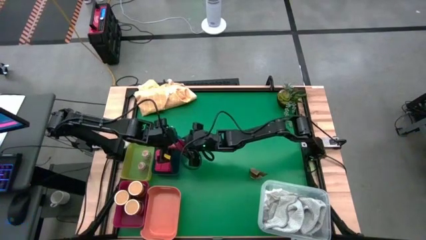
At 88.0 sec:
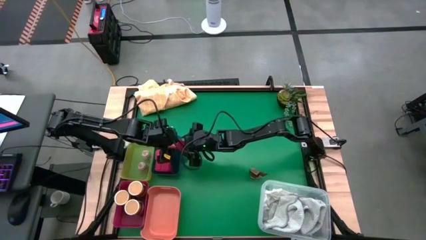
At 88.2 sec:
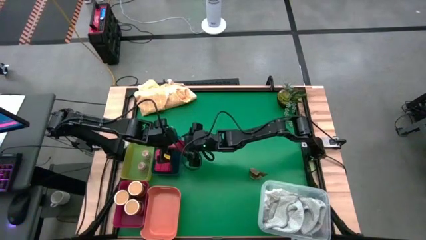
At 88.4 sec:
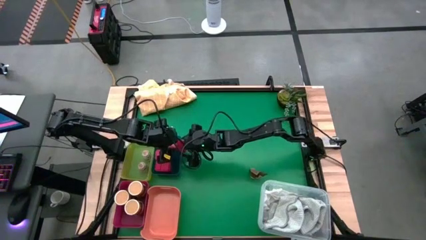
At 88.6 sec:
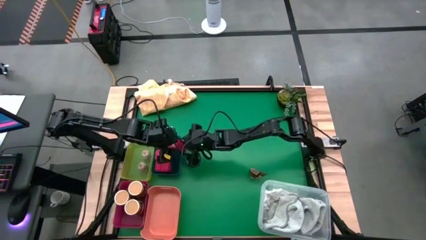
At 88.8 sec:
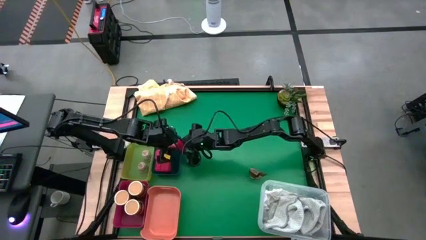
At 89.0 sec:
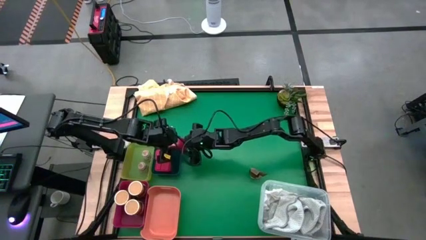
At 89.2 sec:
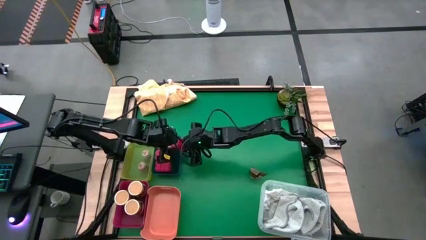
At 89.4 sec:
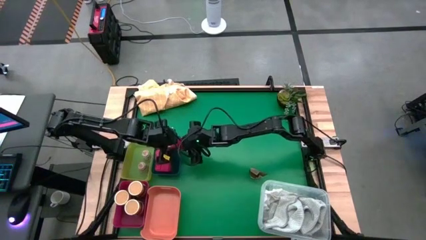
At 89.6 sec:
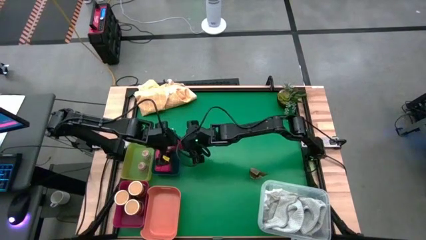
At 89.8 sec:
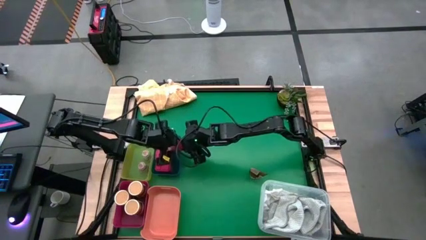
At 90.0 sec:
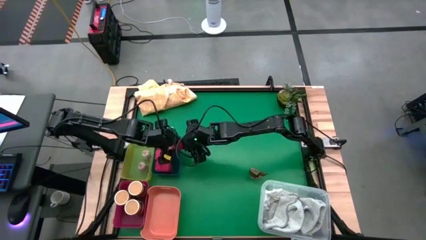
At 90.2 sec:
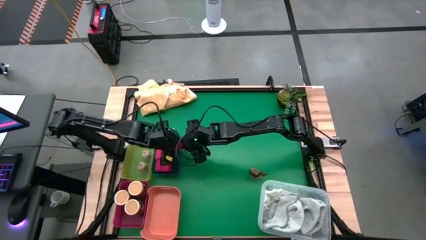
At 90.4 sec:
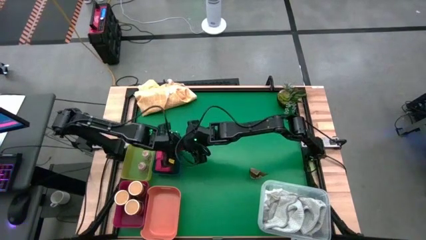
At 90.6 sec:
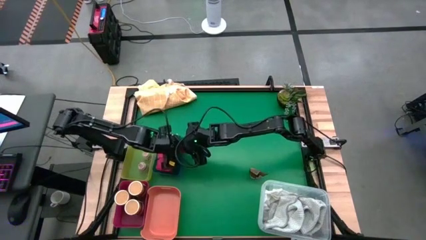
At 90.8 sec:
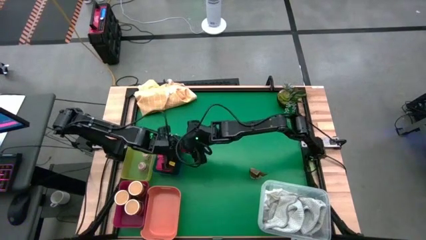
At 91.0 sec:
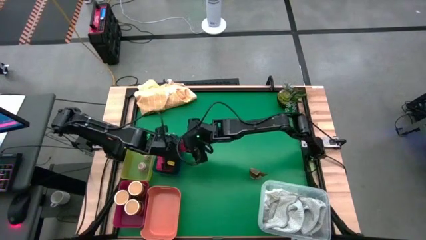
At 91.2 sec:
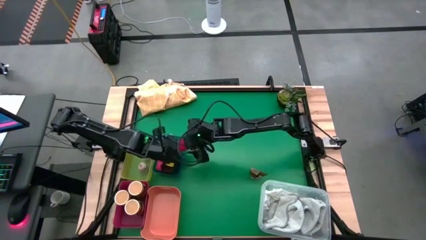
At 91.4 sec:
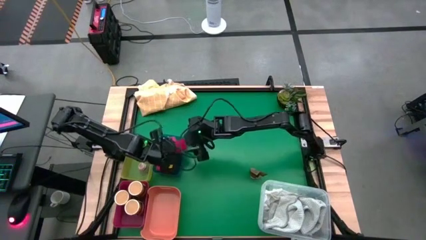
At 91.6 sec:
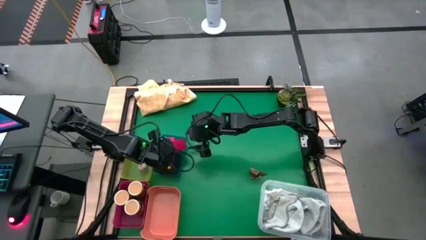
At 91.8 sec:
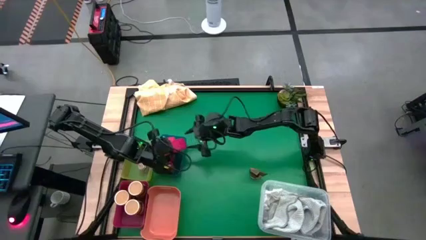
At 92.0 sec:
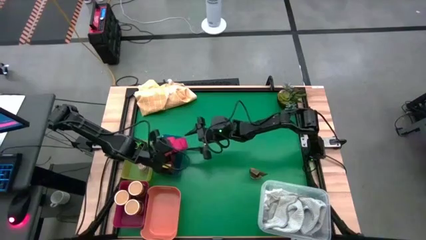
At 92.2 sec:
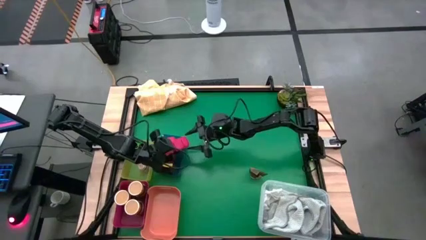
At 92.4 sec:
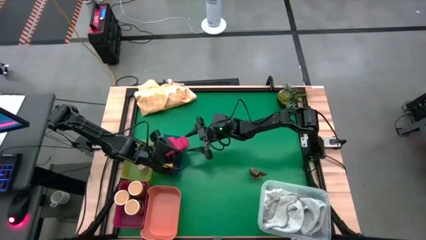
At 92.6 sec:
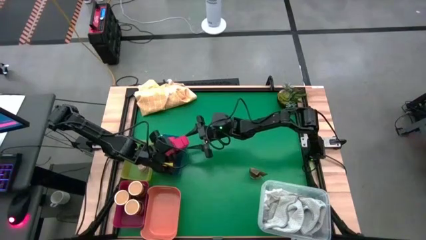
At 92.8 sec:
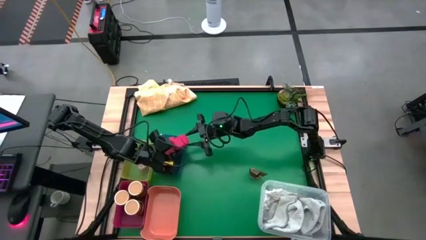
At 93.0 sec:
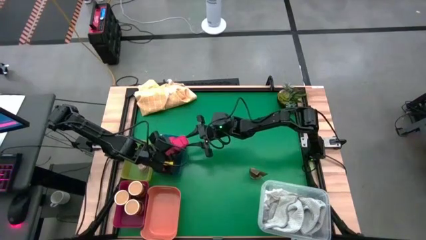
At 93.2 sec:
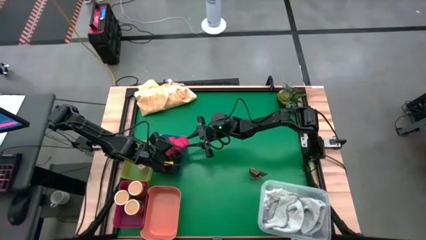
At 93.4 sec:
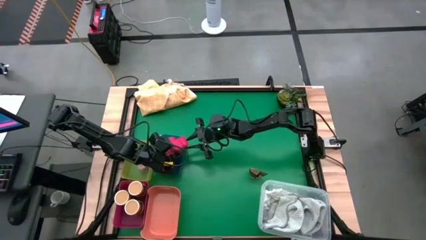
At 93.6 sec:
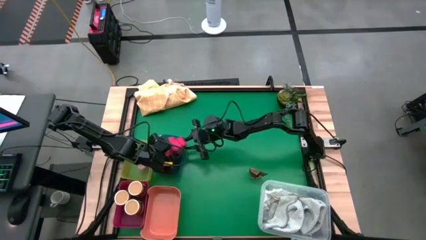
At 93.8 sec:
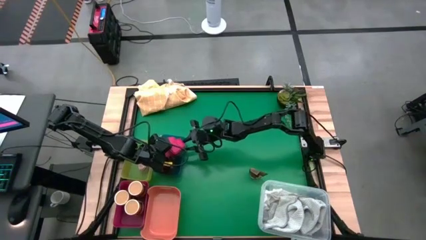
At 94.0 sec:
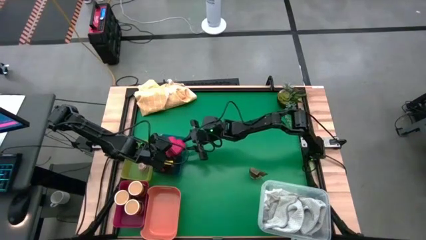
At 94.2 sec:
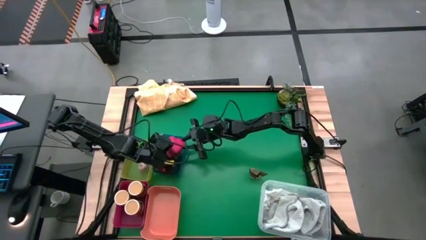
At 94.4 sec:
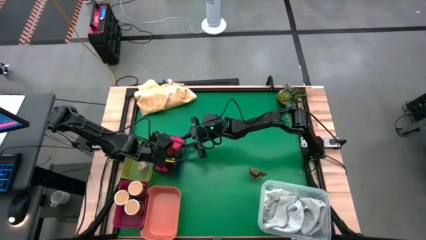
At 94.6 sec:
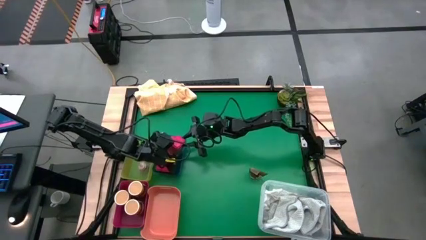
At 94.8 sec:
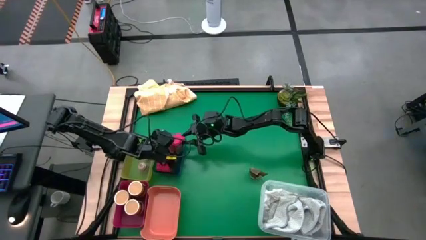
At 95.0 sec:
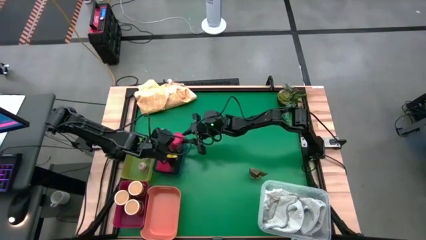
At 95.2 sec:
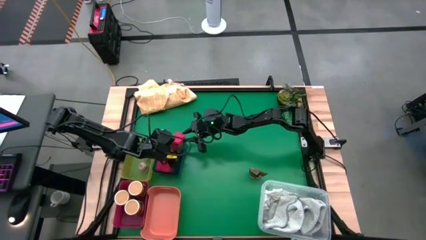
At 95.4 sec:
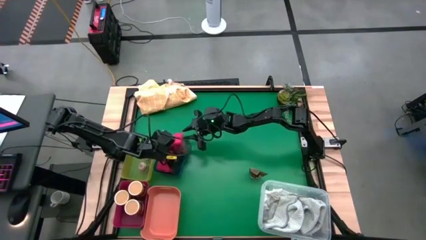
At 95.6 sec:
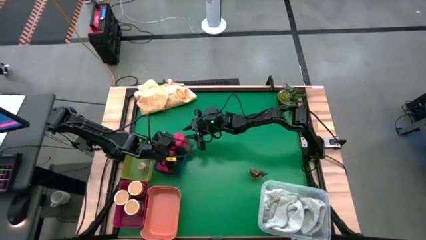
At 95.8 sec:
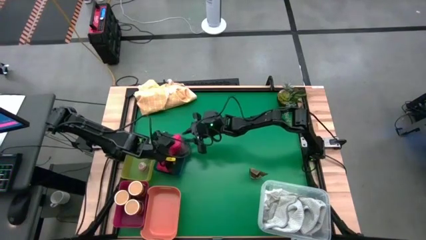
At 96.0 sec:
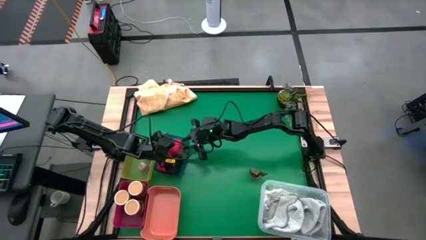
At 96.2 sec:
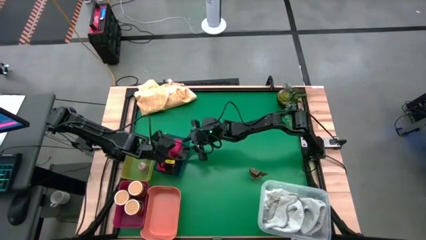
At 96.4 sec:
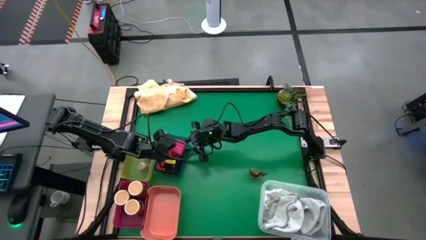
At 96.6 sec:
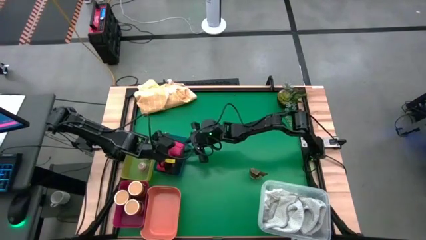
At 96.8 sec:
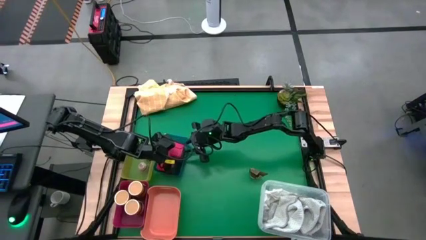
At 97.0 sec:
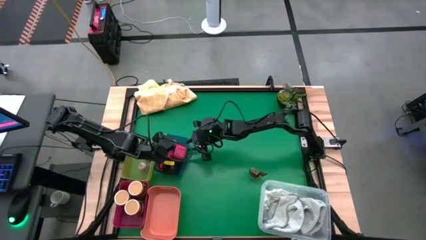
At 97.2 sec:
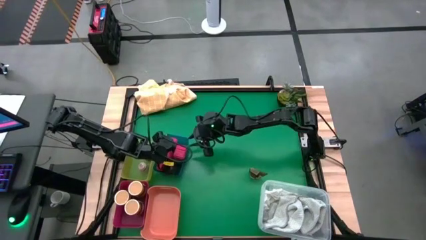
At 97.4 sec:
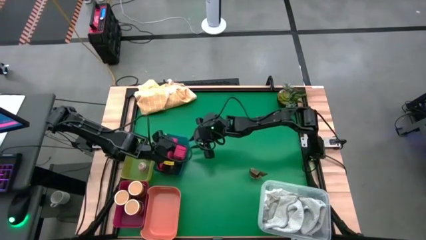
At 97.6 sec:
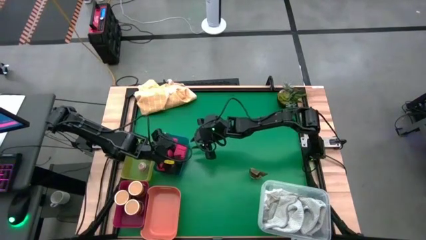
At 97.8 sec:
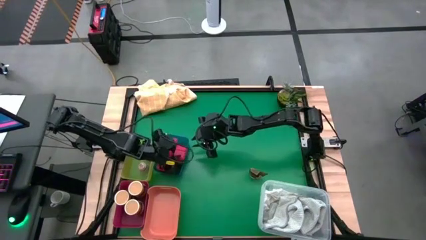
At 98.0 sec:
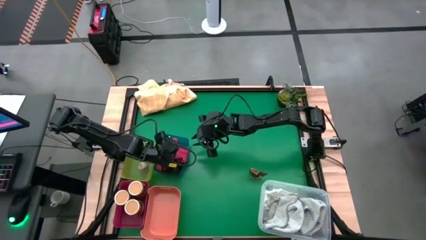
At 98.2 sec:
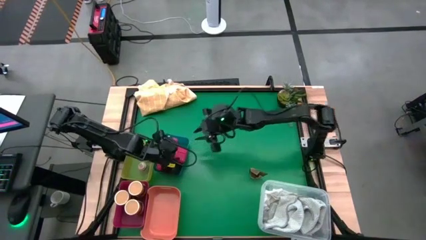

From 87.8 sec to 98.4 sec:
Task: Sort spices by type
Put the red seasoning can into the blue bin

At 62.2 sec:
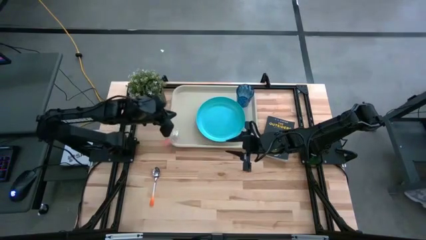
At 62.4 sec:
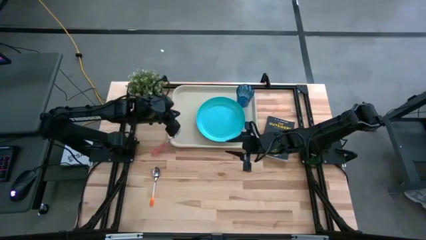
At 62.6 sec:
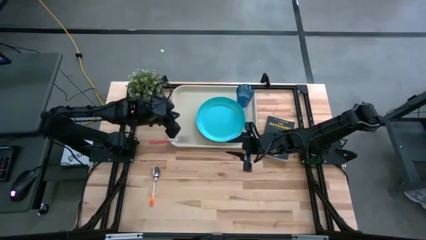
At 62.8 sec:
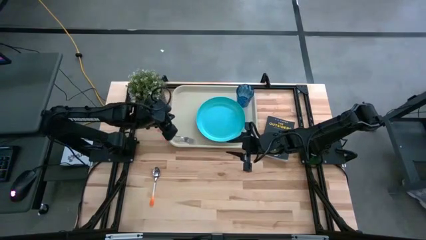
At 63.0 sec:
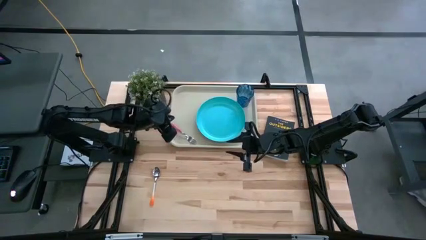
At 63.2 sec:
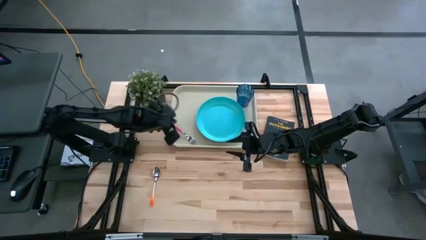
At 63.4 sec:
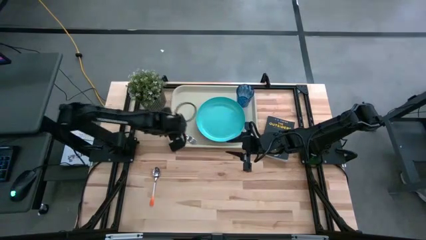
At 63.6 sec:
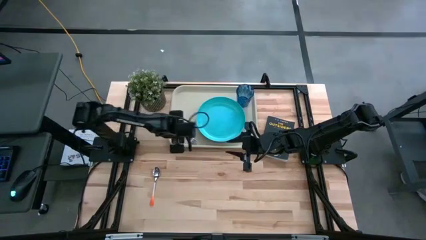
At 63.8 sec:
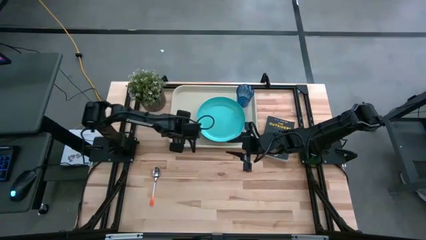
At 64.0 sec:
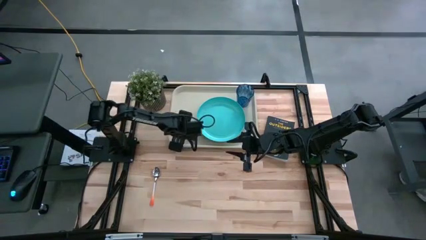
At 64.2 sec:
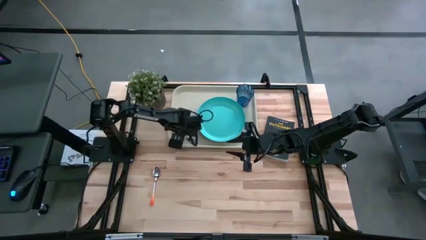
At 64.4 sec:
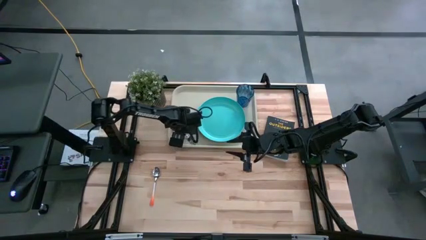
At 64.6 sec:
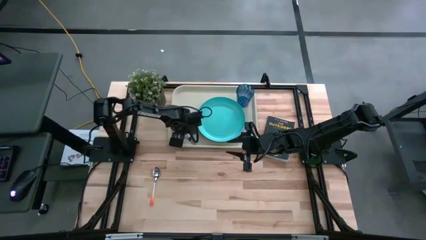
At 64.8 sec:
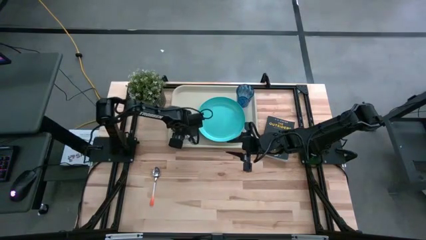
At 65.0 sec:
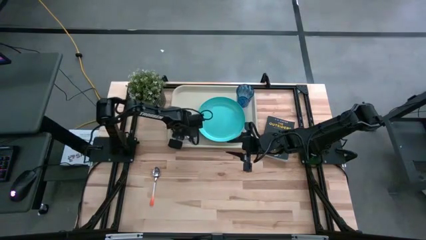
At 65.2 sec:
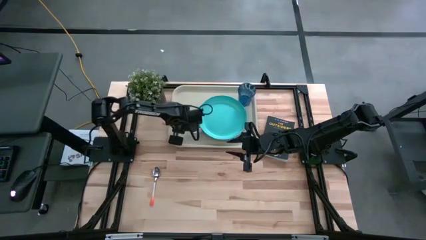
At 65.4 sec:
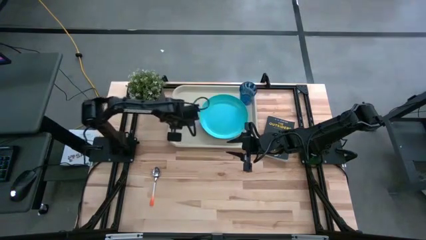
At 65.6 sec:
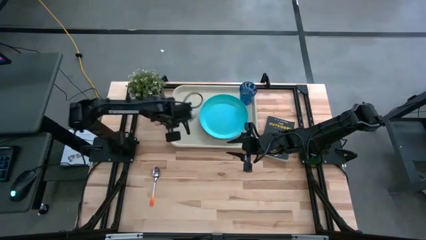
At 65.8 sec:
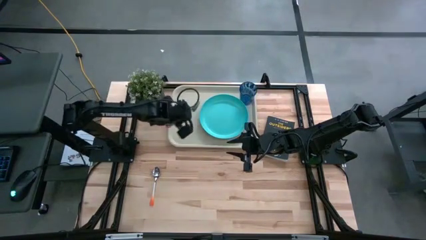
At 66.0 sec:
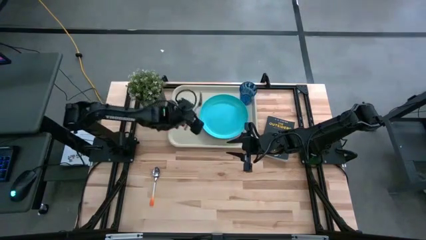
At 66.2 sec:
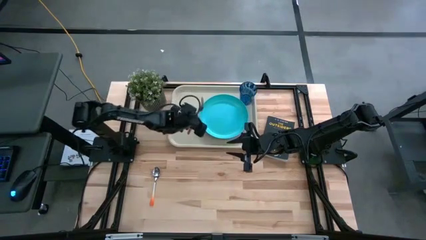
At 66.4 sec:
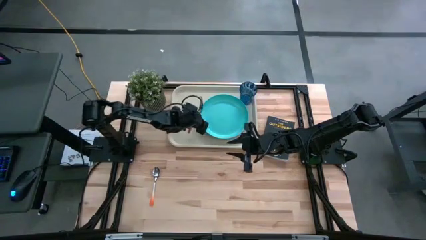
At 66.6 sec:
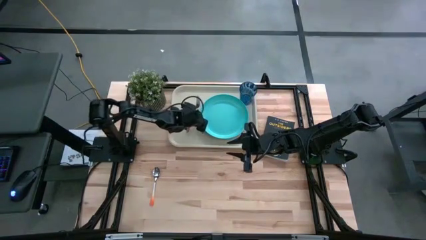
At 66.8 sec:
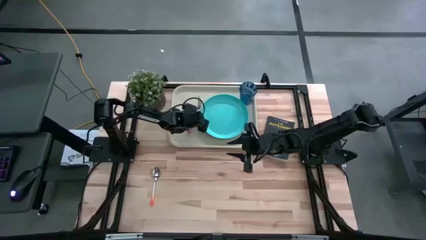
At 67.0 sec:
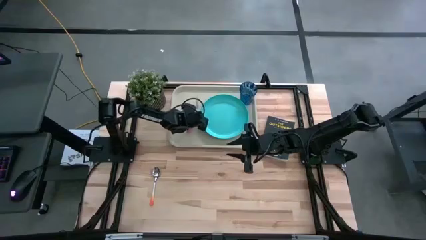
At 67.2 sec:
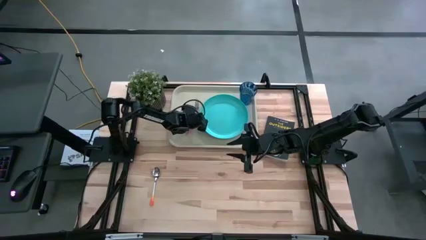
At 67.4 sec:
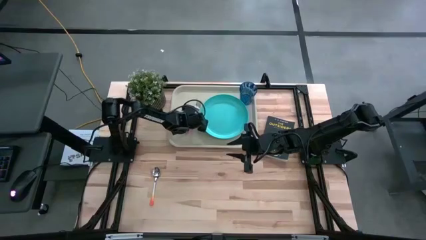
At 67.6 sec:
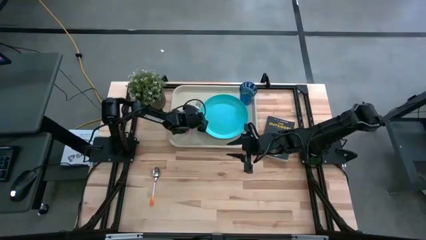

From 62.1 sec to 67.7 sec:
Task: Pick and place plate/cup/fork/spoon on tray
Put the red fork on the white serving tray to the left of the blue plate
